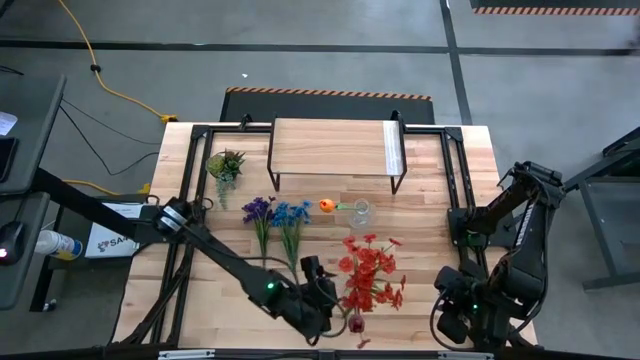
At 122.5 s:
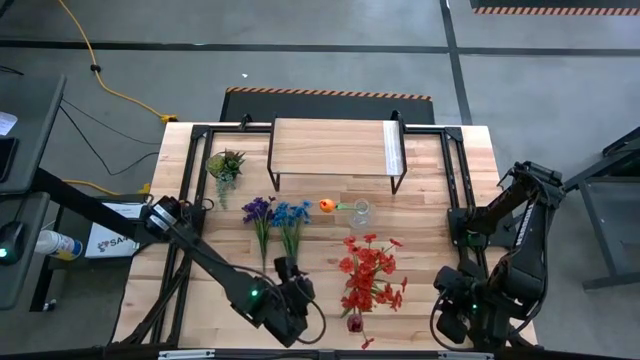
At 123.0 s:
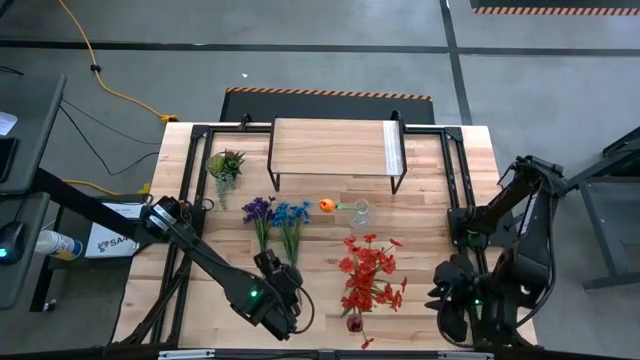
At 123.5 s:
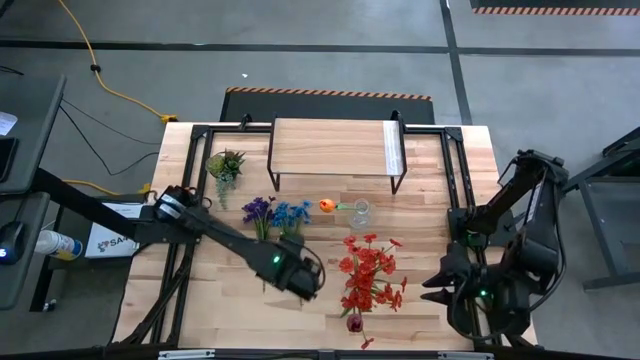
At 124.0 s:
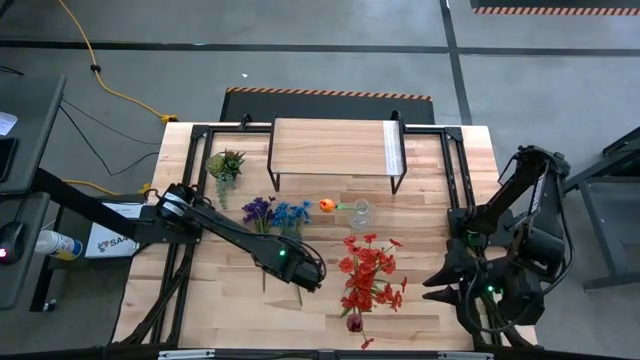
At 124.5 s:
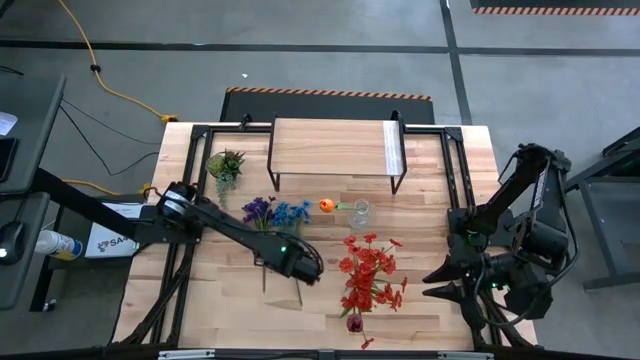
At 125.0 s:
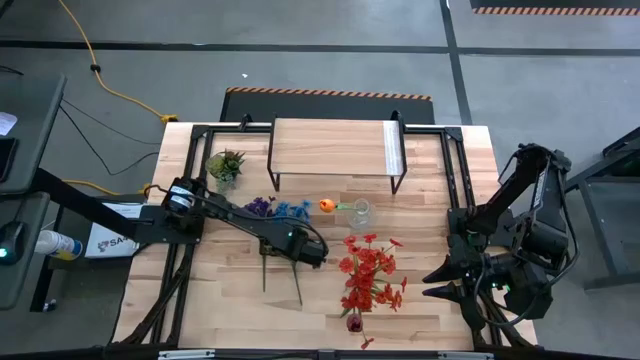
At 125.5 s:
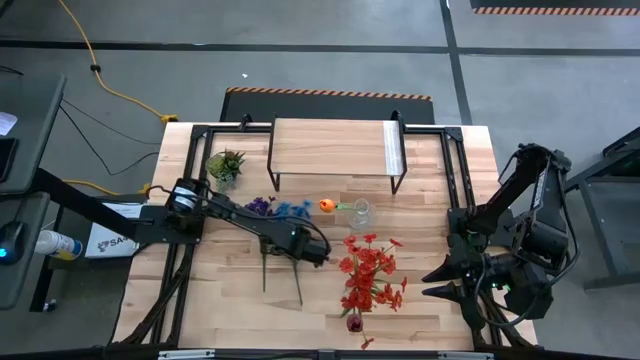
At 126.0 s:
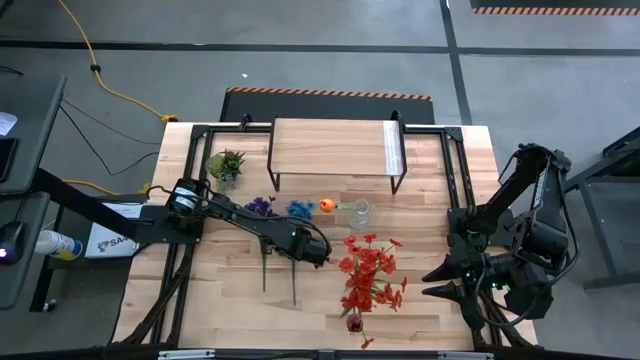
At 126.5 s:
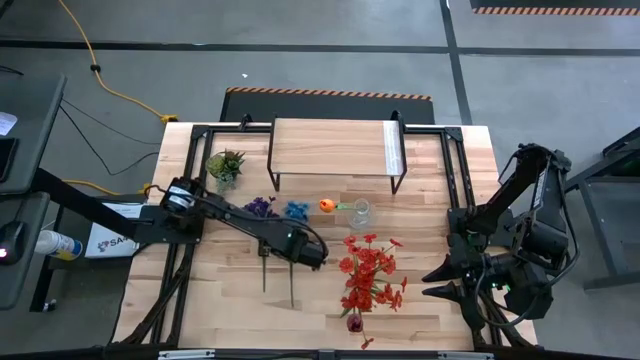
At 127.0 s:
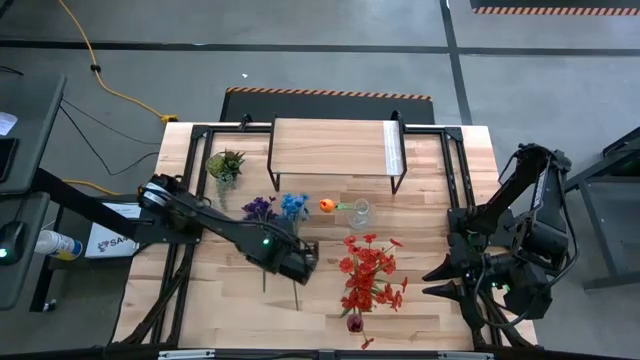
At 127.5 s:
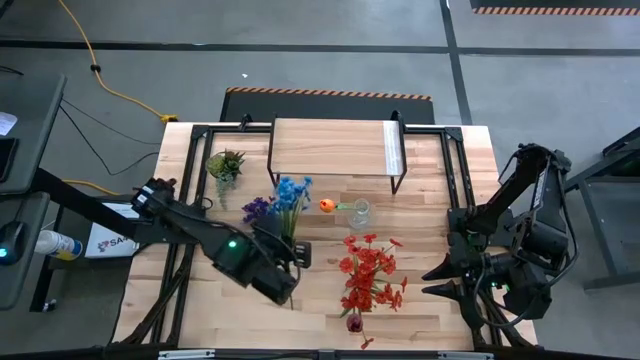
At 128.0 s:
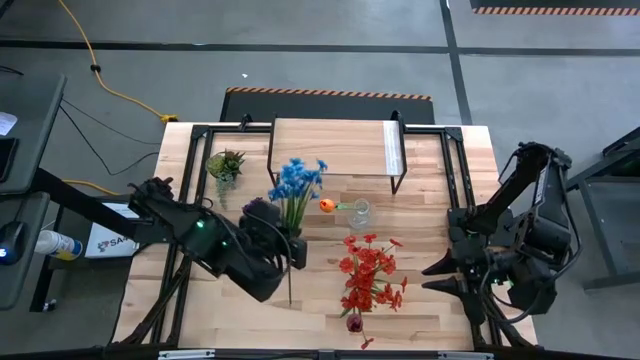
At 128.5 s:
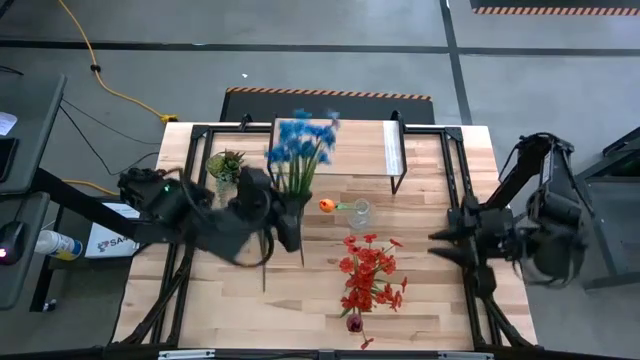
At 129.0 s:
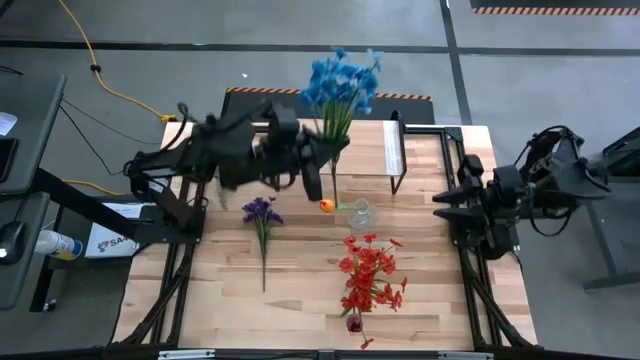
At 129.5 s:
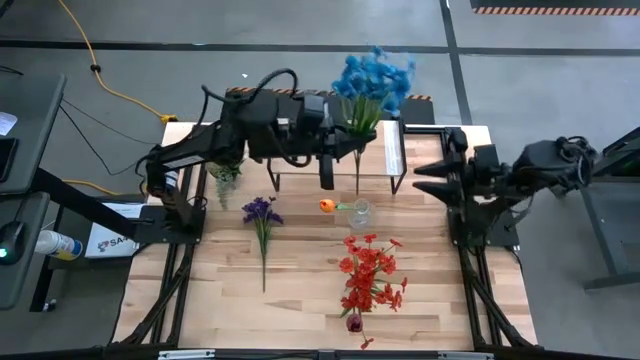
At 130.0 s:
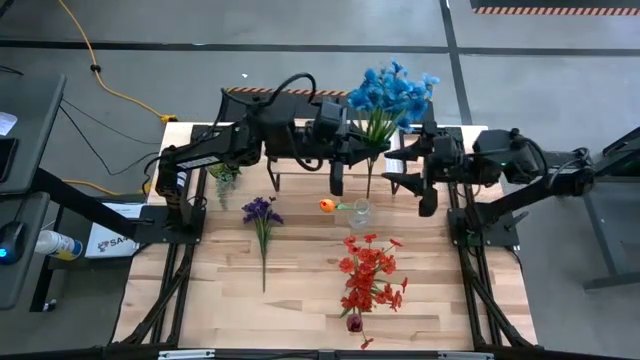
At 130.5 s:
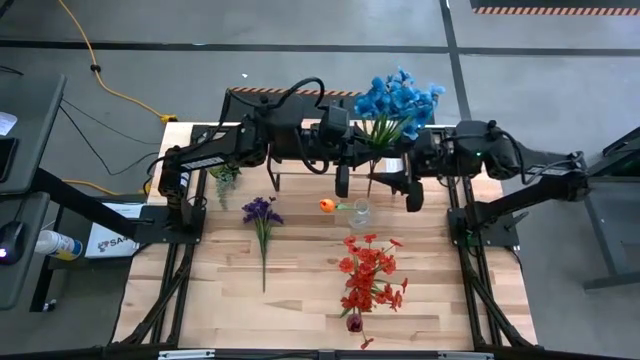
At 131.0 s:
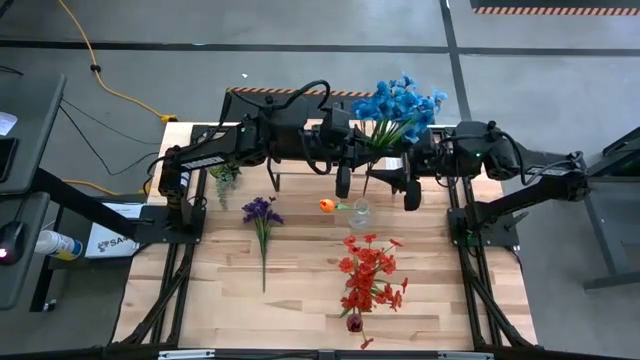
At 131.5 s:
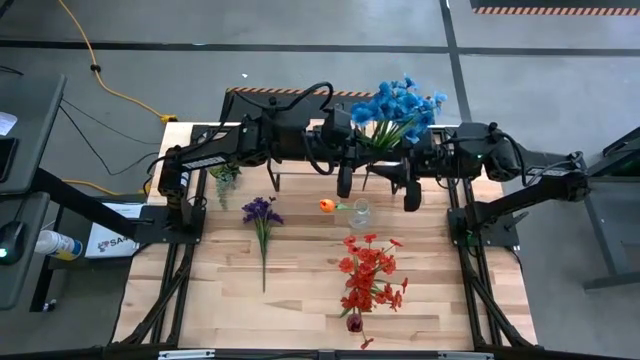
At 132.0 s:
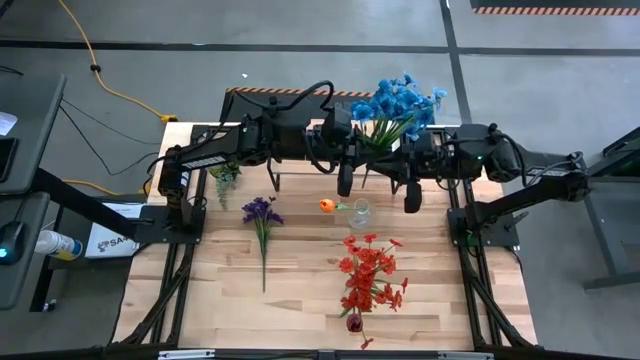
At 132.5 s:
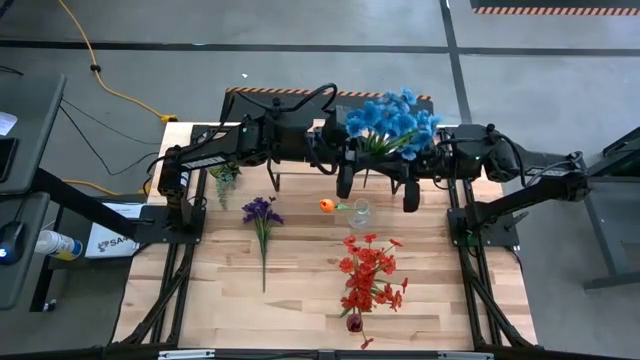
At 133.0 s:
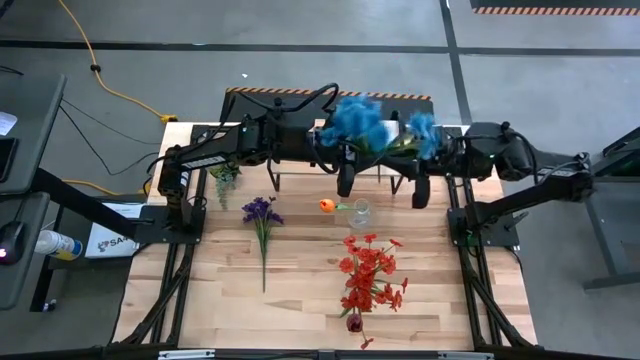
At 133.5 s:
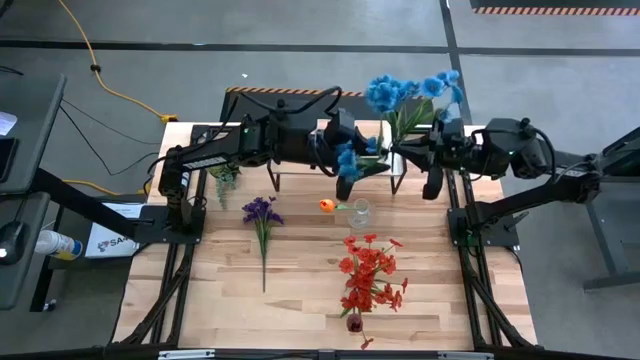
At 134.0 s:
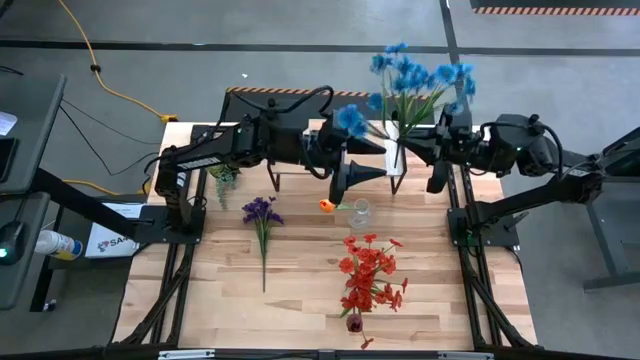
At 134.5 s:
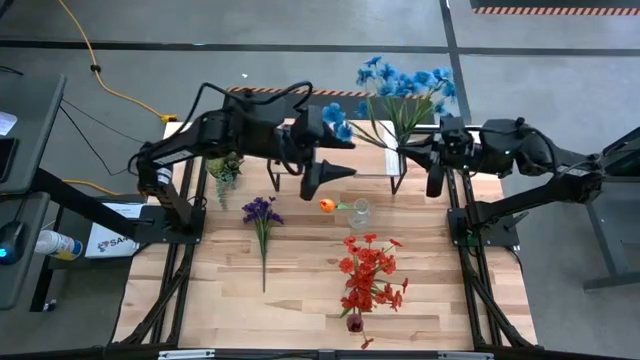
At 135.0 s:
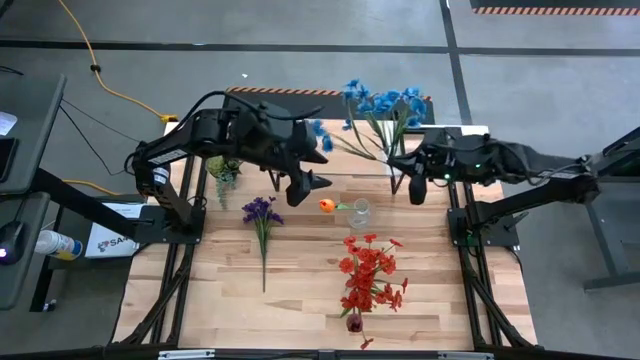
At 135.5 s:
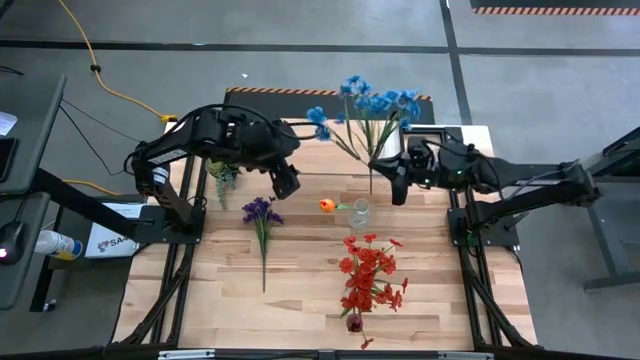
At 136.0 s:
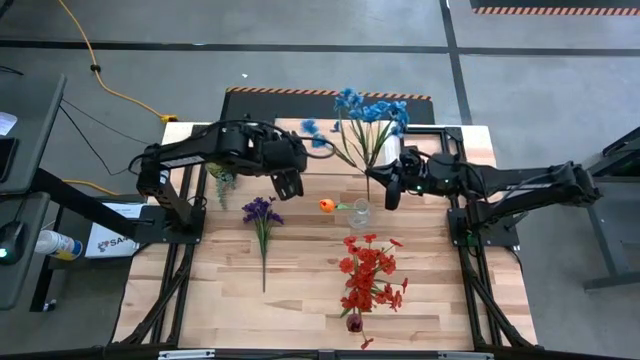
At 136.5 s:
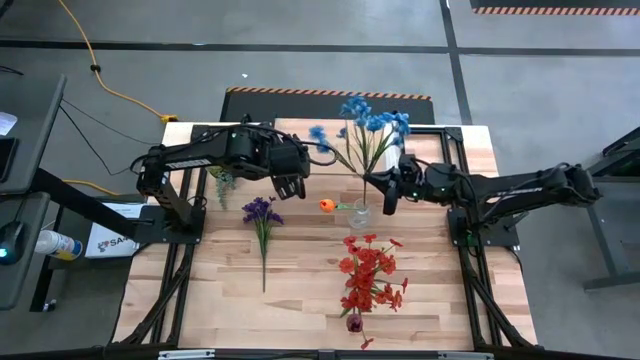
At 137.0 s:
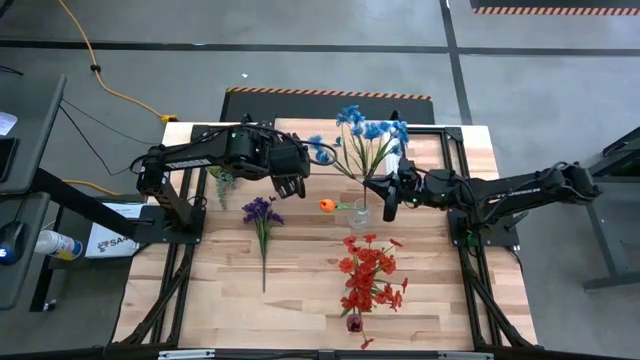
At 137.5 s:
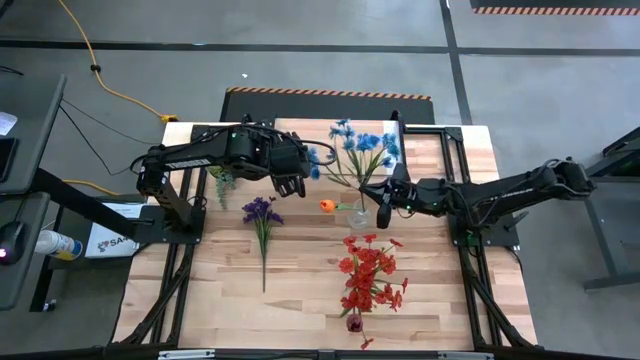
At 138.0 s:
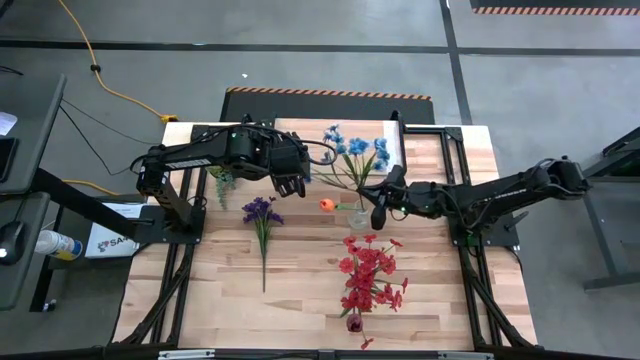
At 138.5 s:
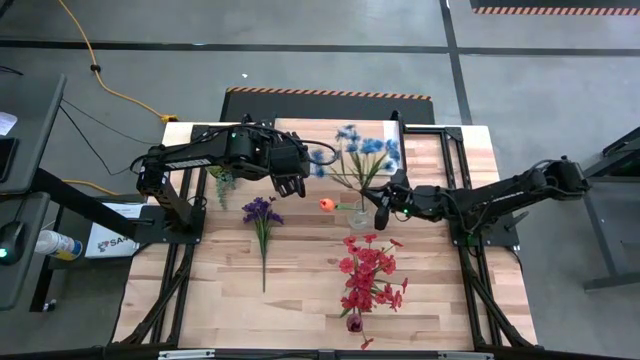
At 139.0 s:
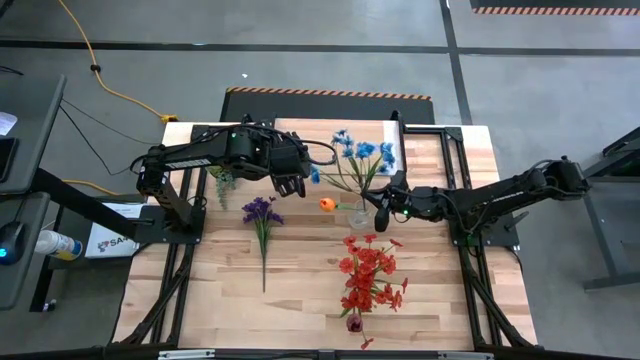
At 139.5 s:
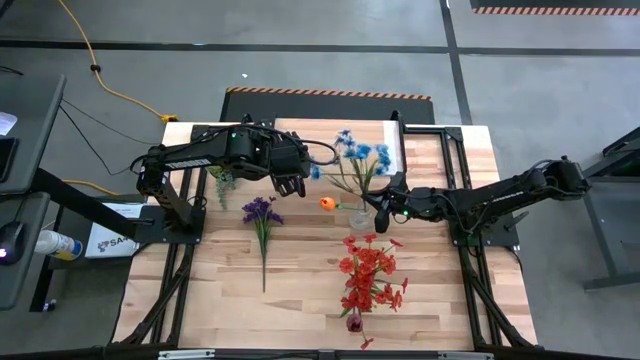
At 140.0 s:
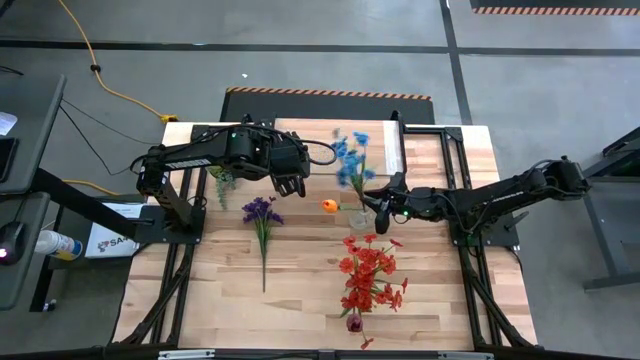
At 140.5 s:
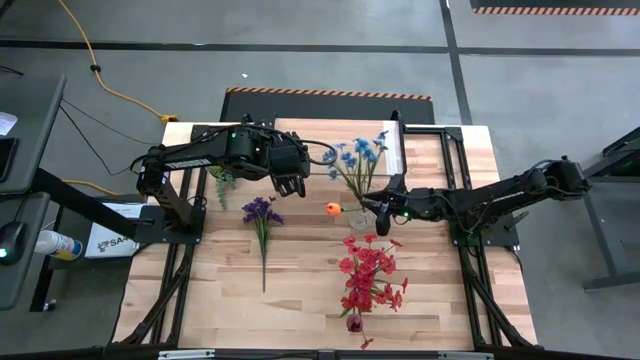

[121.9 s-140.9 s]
Task: Pick and place flowers into a vace then onto a shelf
Put the blue flowers into the top transparent vase

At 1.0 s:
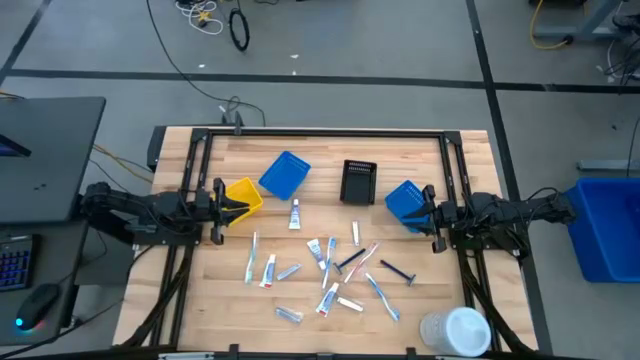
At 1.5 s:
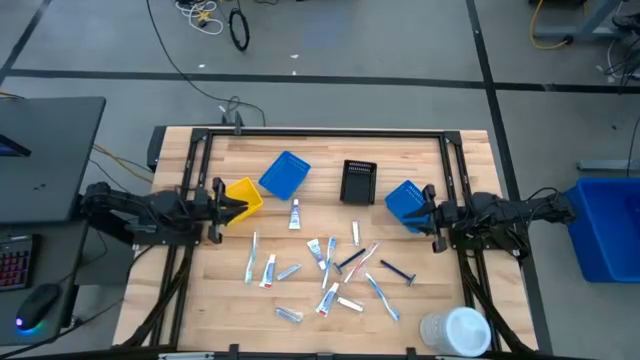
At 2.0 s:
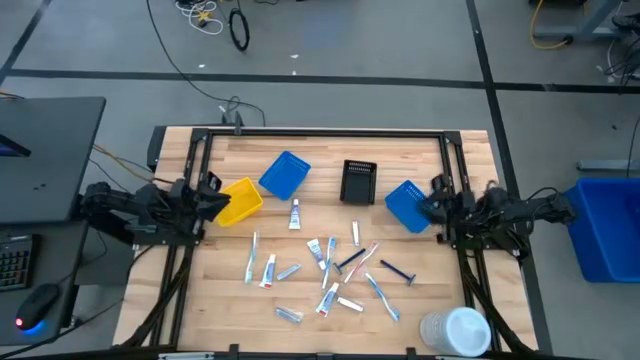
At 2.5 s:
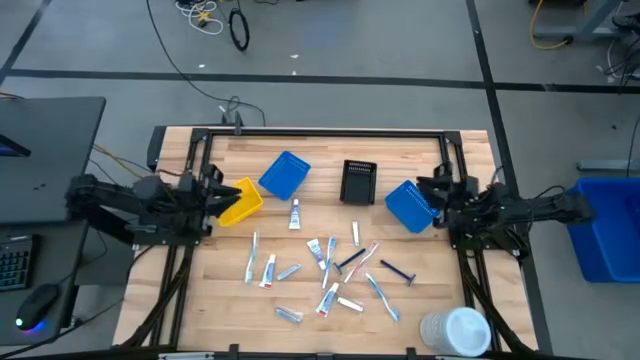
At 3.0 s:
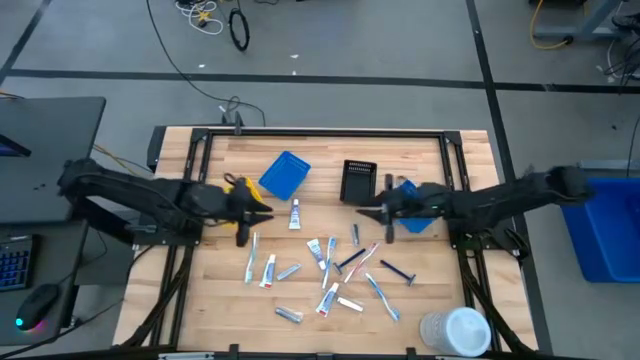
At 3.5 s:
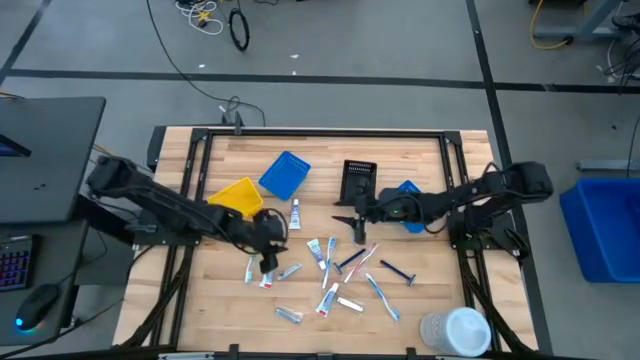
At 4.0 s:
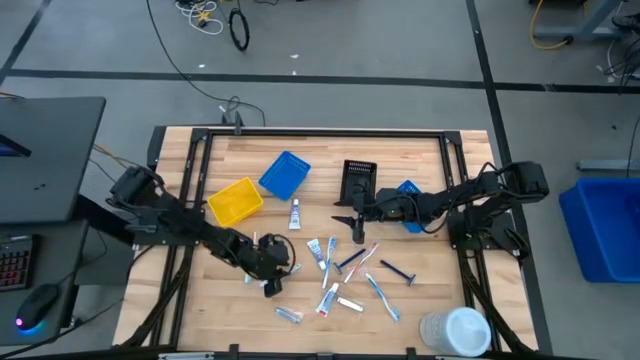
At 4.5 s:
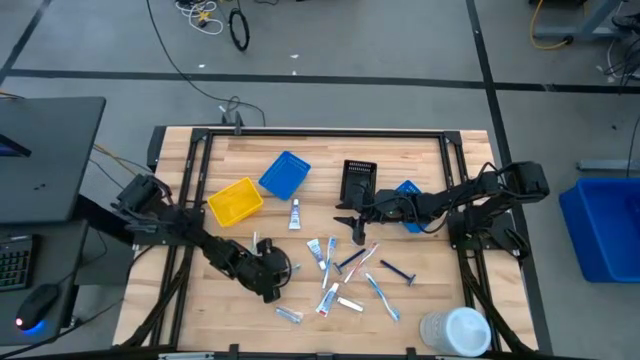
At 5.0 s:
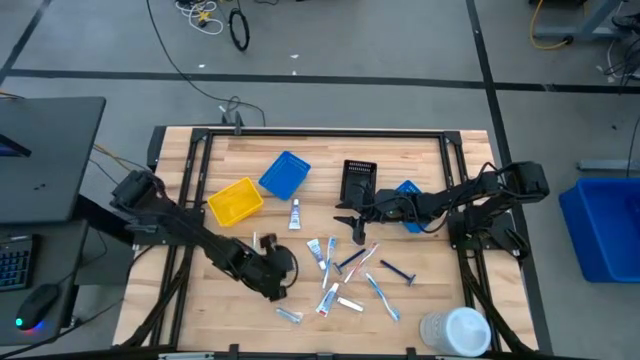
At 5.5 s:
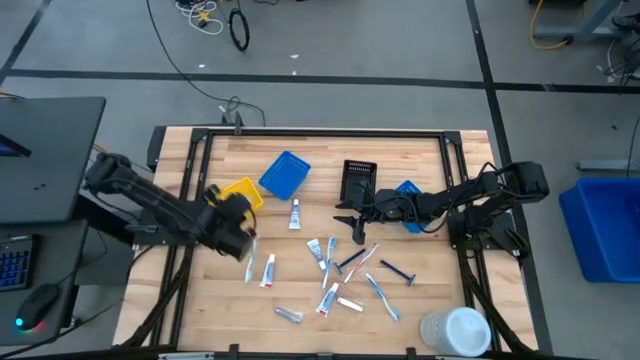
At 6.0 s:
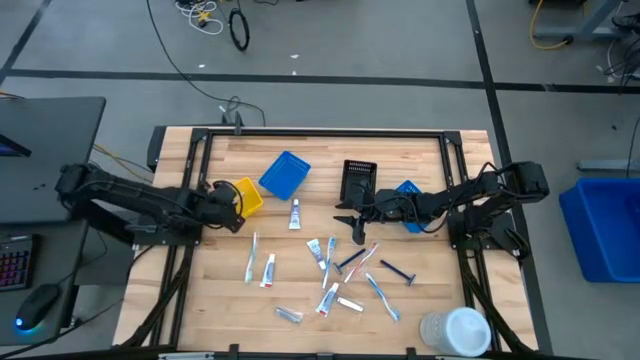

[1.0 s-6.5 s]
Task: Pick & Place Travel size toiletries
Put the silver nail cutter into the yellow bin
